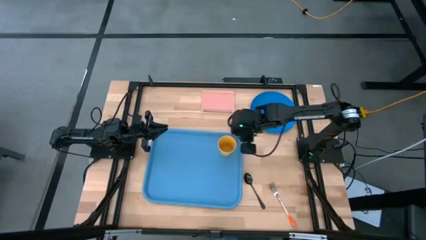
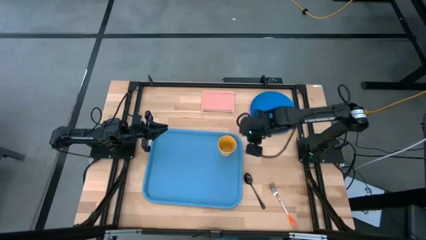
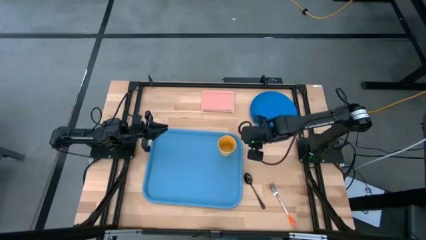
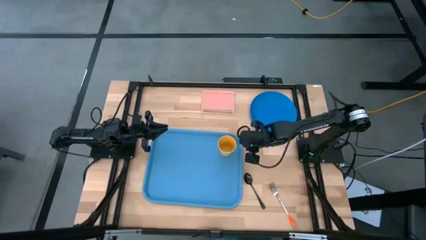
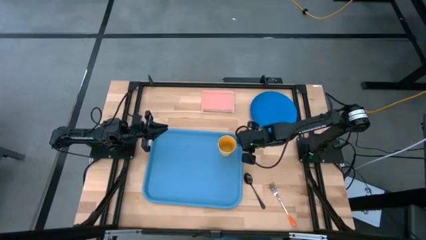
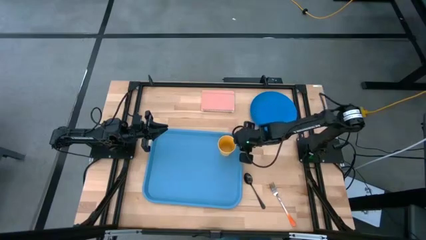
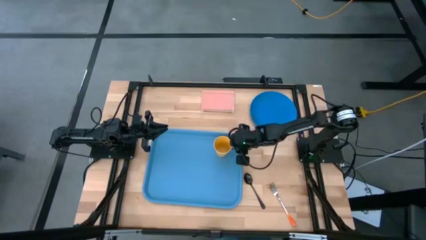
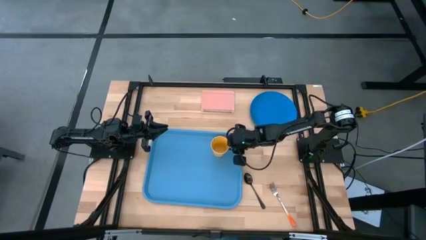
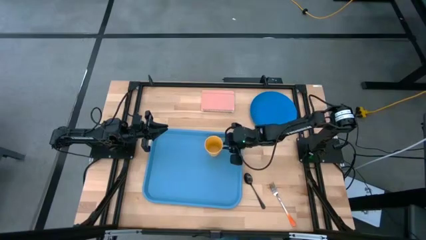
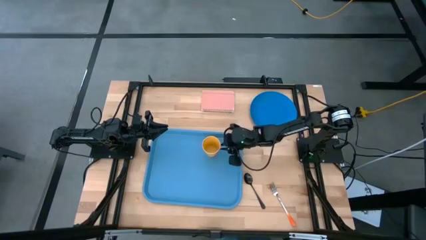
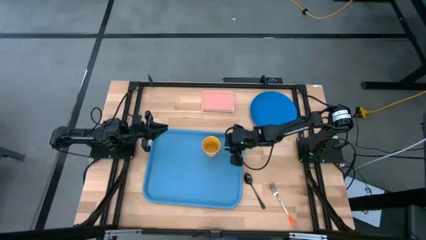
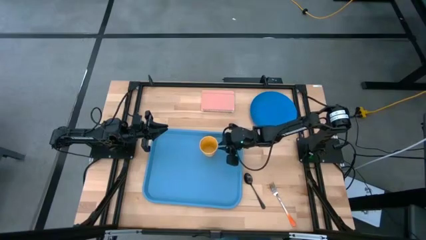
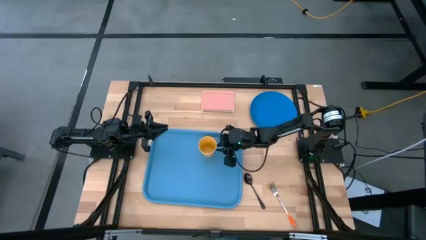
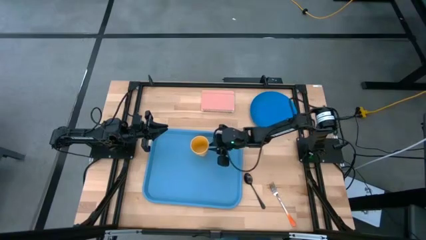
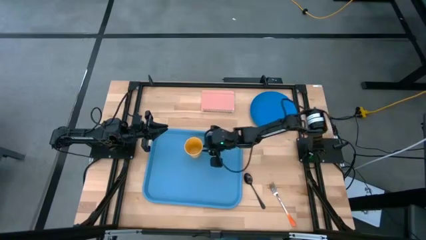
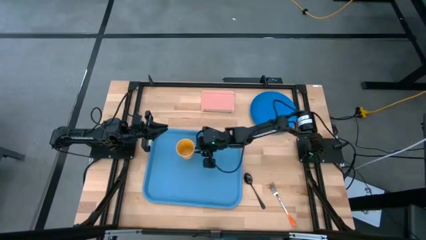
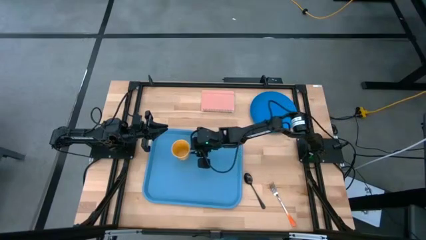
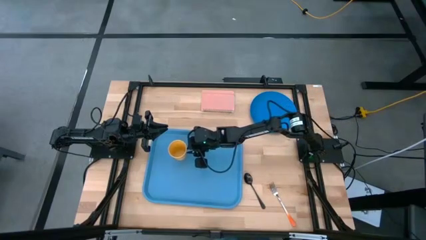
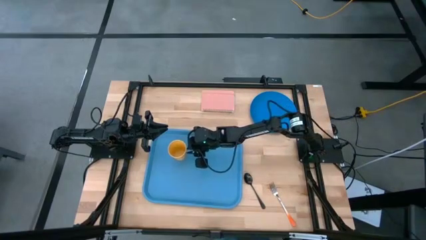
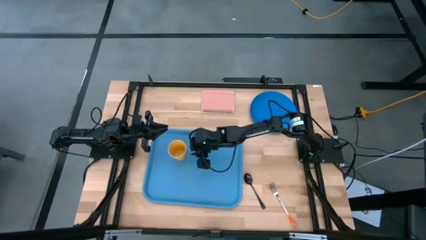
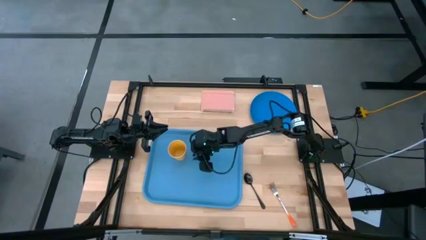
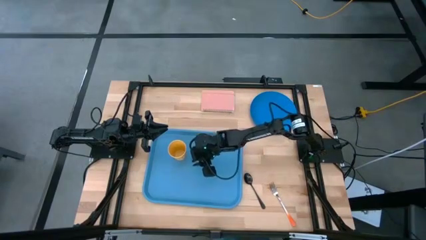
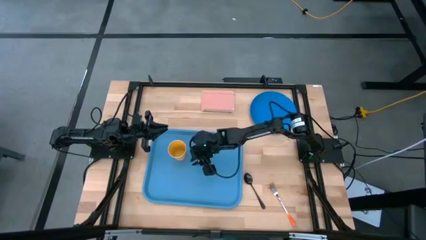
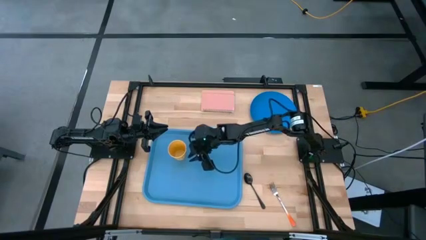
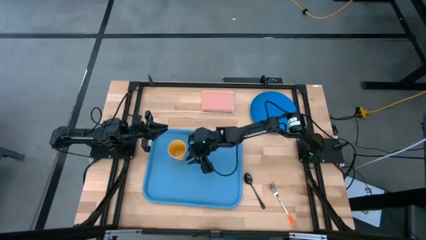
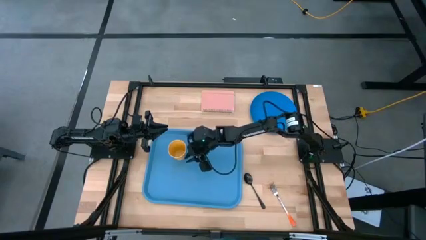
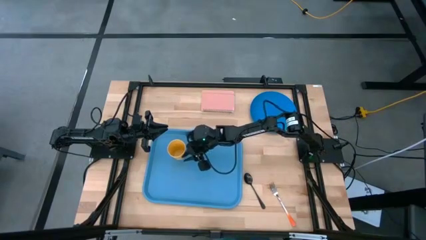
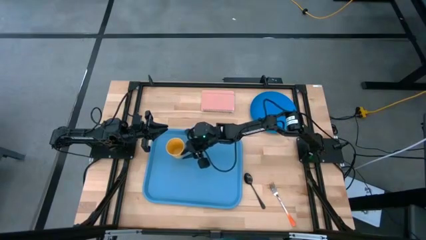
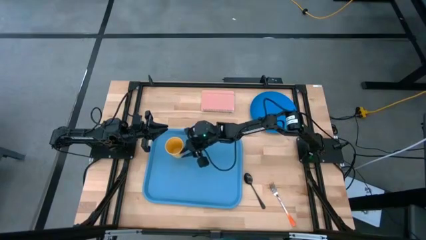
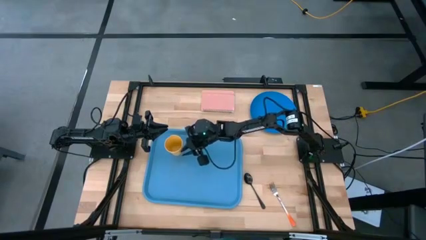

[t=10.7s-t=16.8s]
Task: Pick and place plate/cup/fork/spoon on tray
Move the yellow cup to the left side of the blue tray

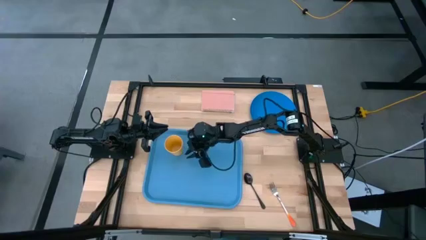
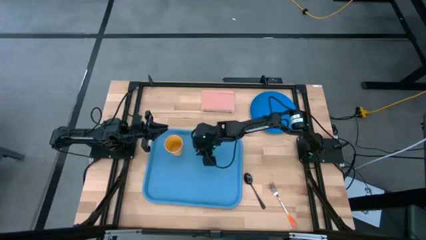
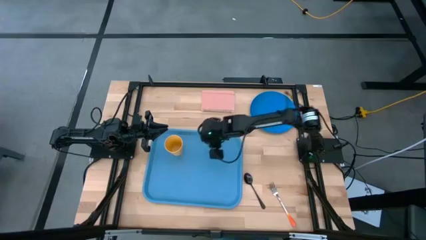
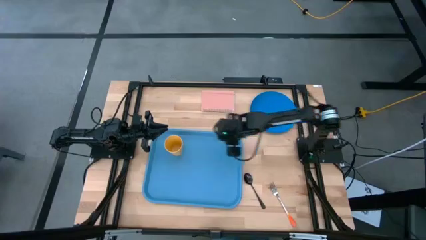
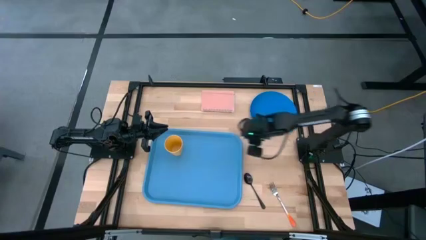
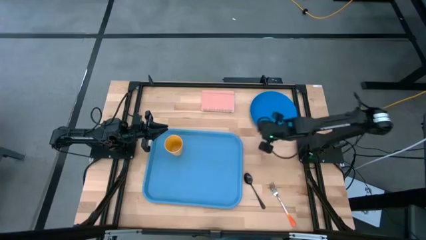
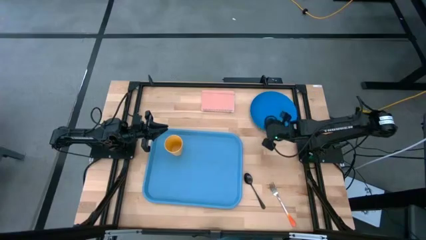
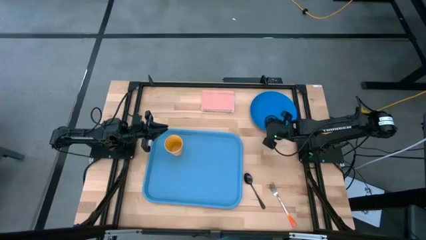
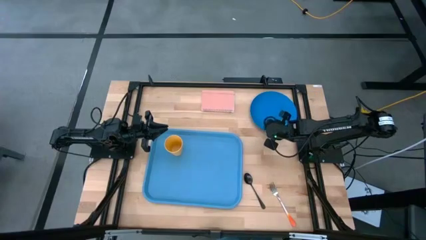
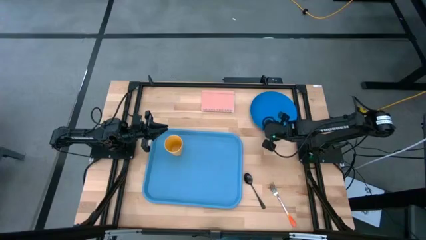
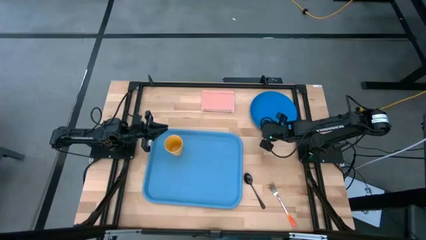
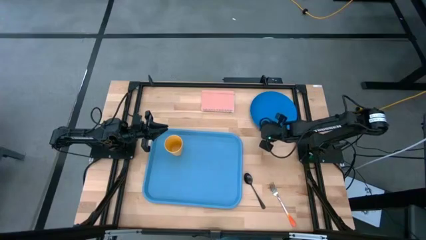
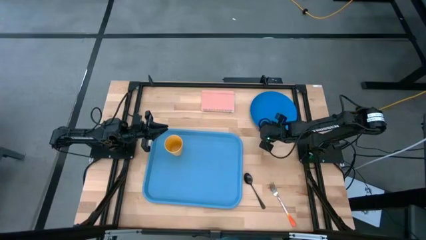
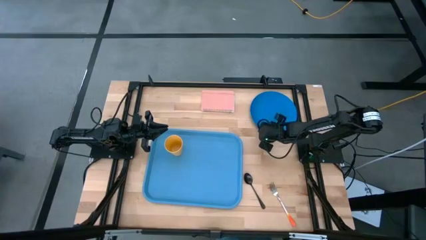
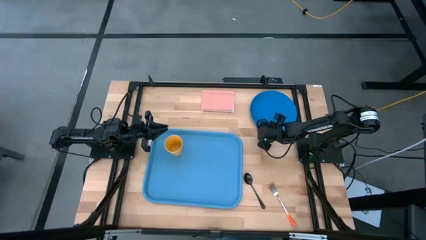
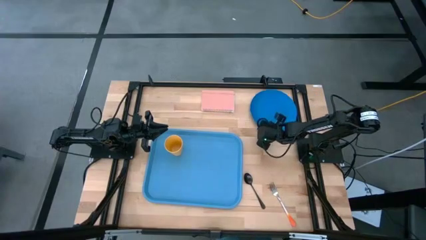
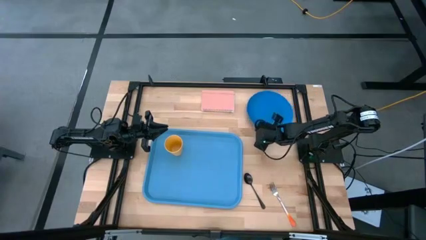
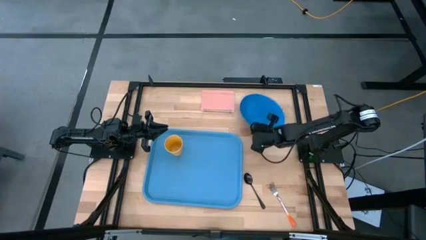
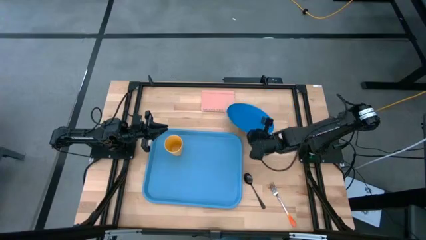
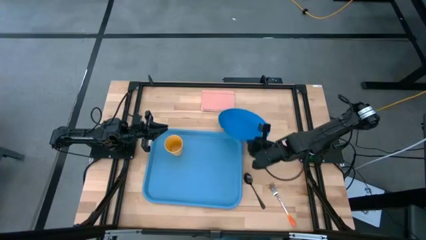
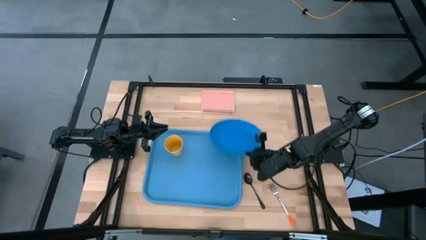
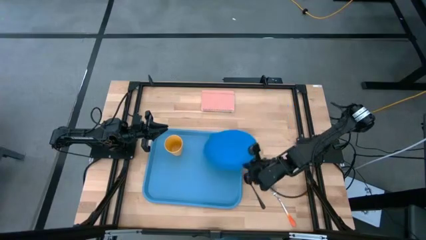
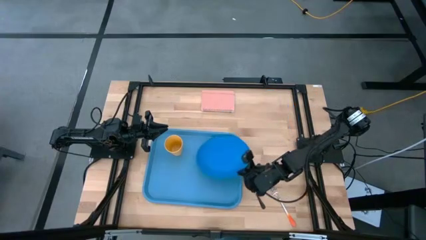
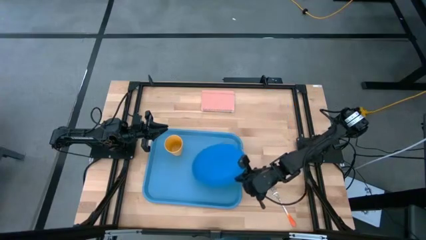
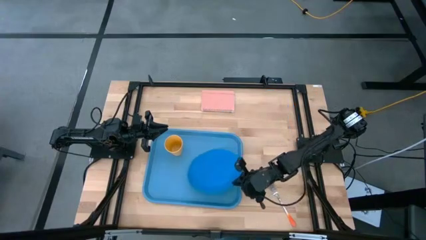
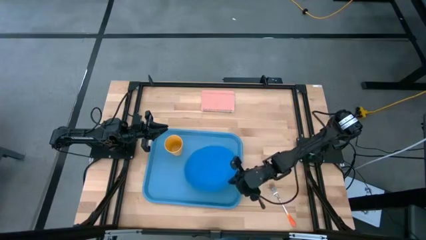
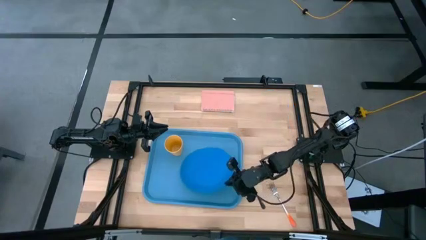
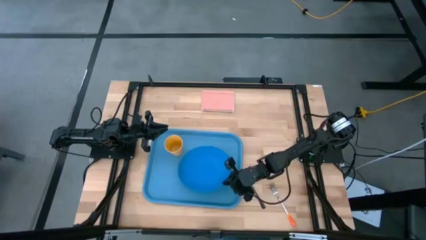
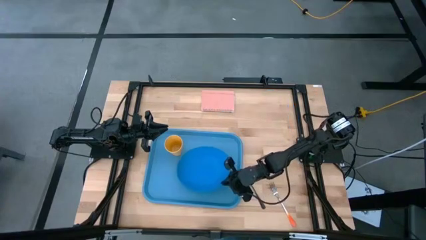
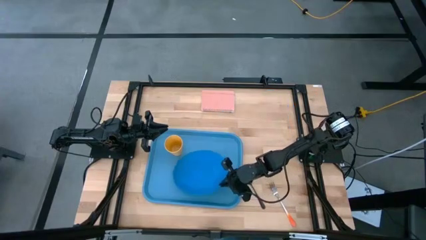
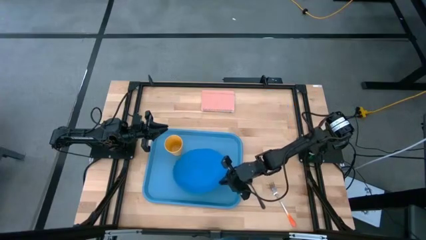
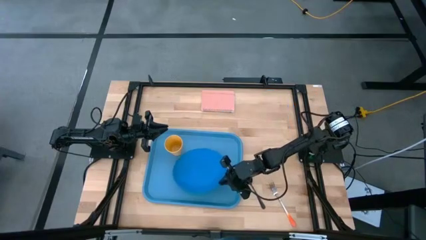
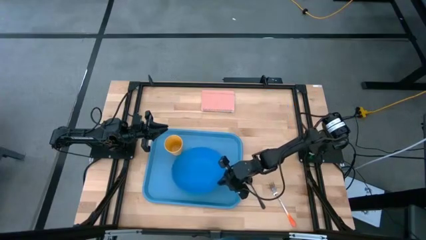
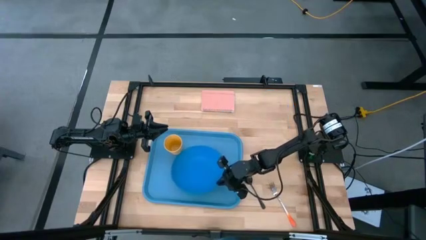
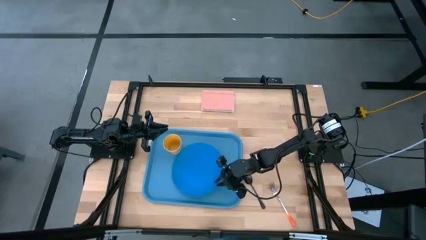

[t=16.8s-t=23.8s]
Put the blue plate on the blue tray

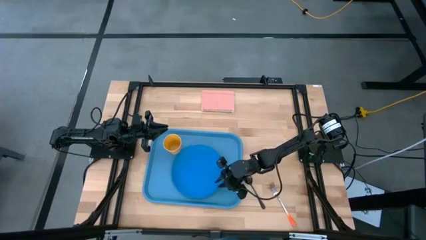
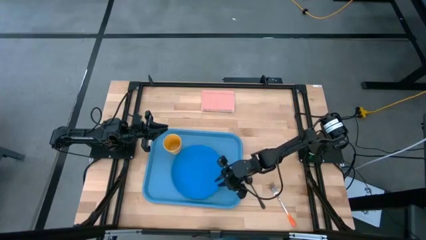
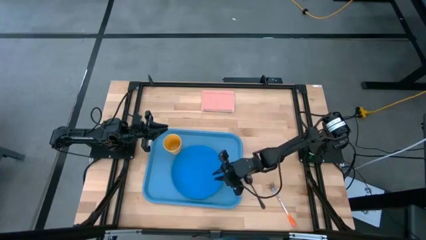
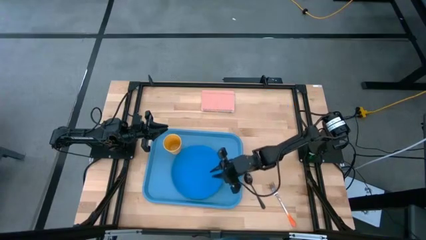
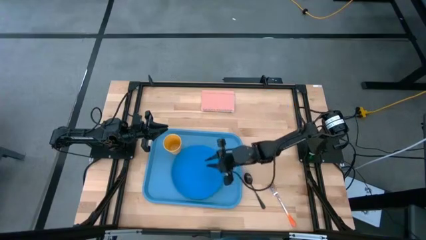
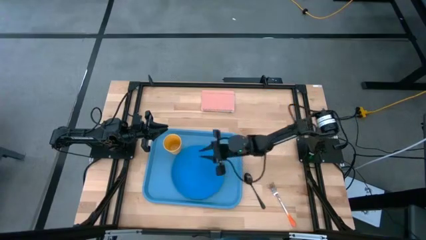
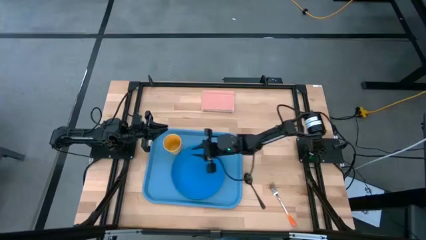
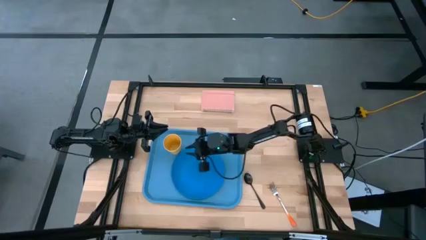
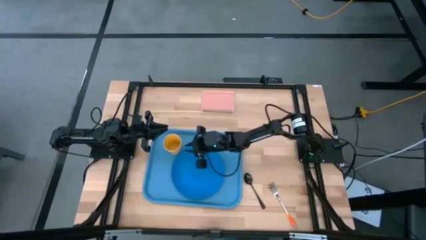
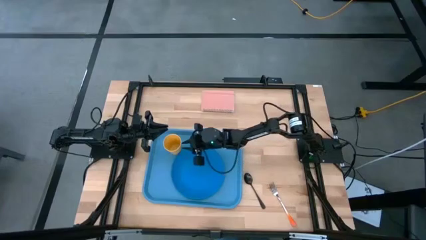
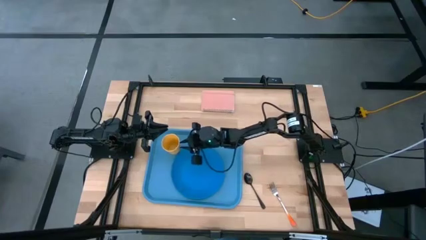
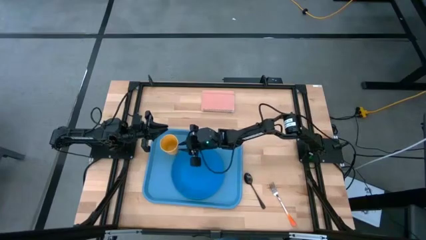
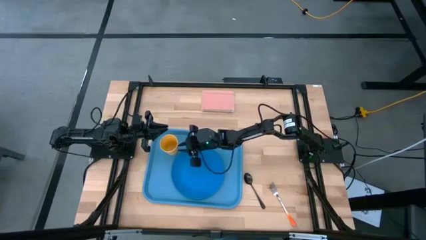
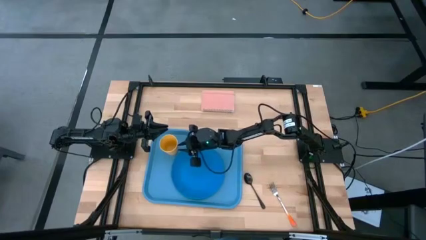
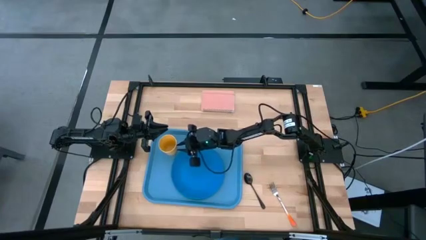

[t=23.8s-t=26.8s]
Adjust the yellow cup

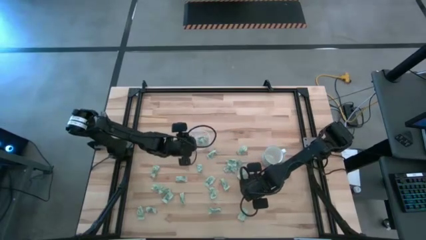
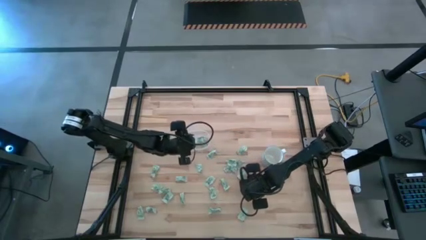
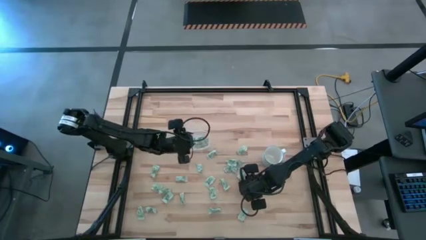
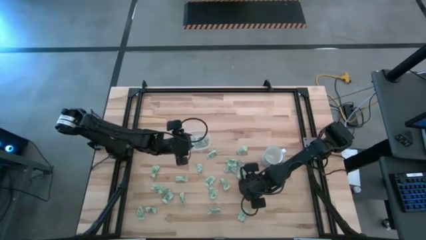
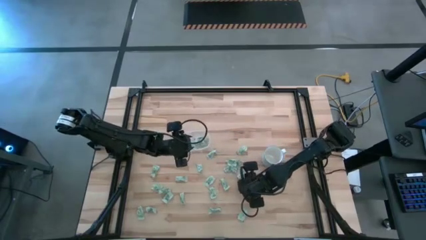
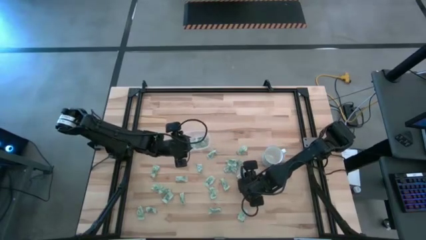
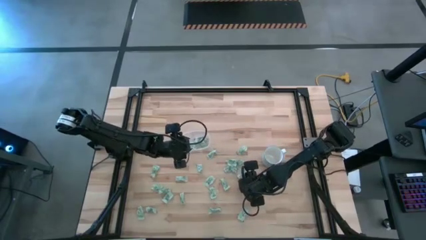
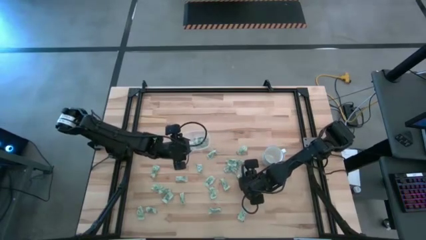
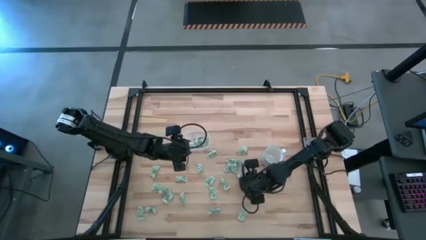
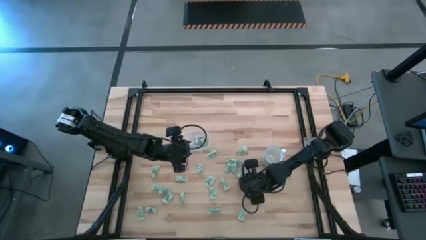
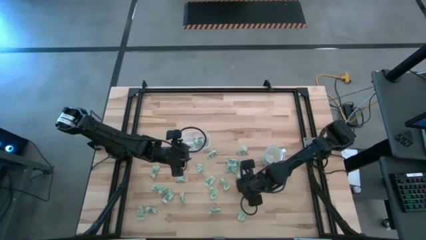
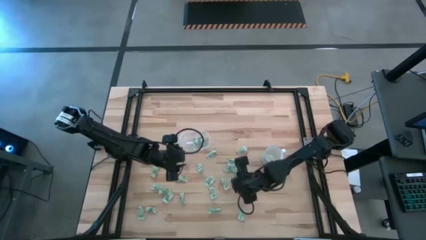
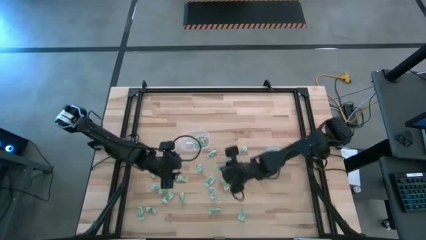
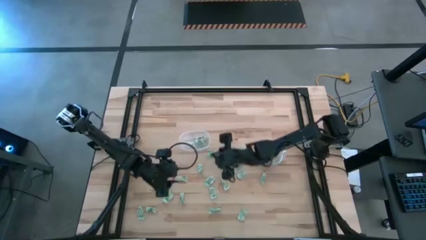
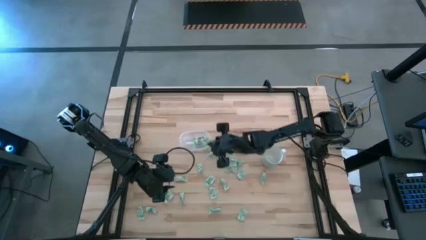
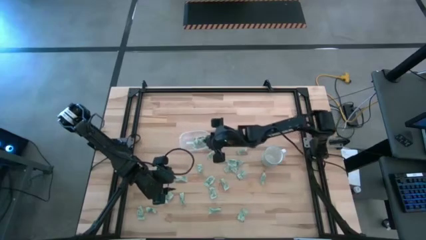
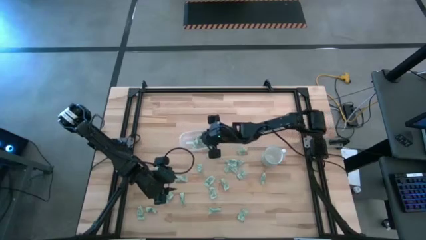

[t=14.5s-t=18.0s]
Task: Pick and place Stevia / Truvia into bins
Put the stevia packet into the transparent bin
